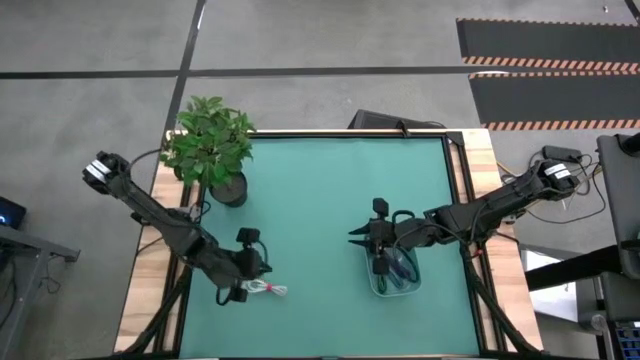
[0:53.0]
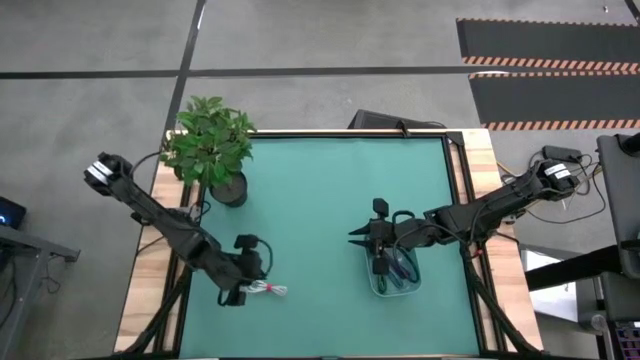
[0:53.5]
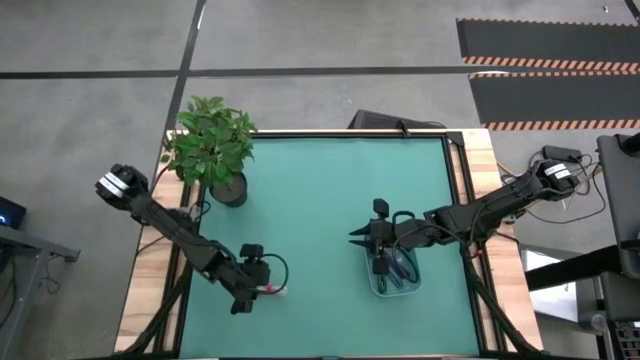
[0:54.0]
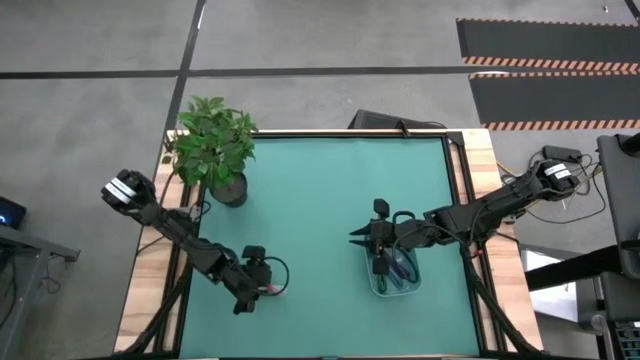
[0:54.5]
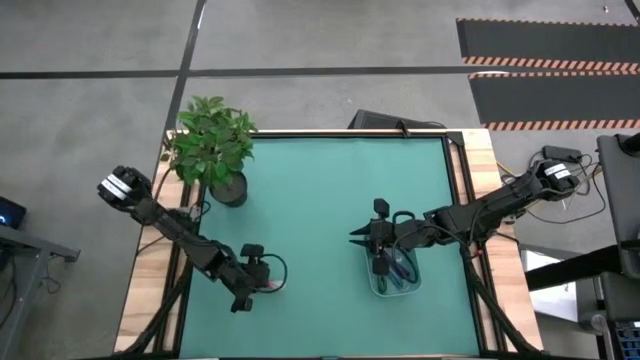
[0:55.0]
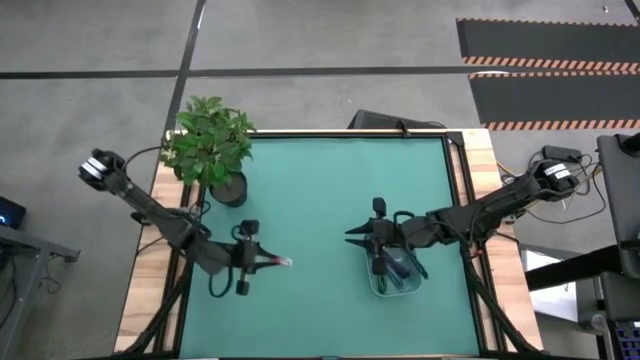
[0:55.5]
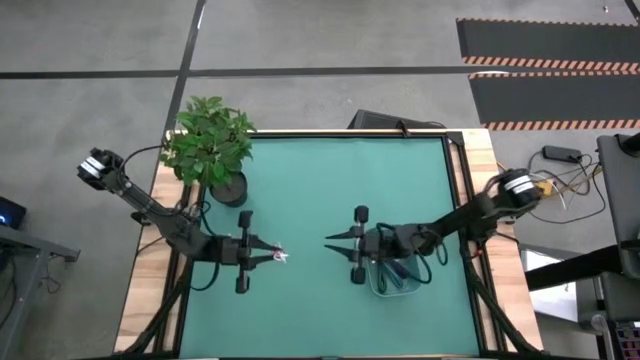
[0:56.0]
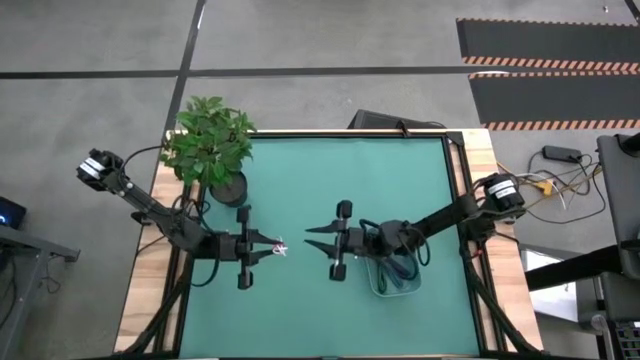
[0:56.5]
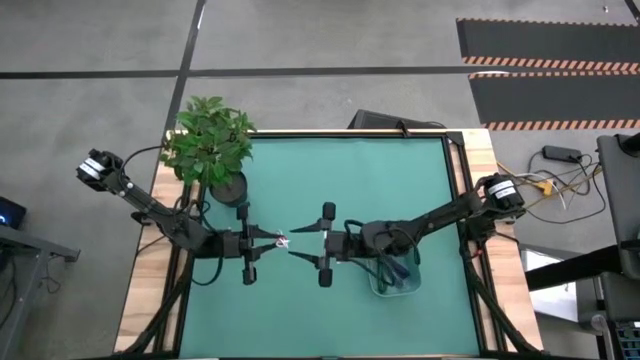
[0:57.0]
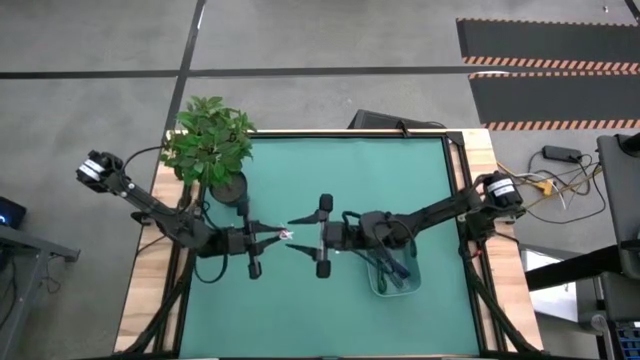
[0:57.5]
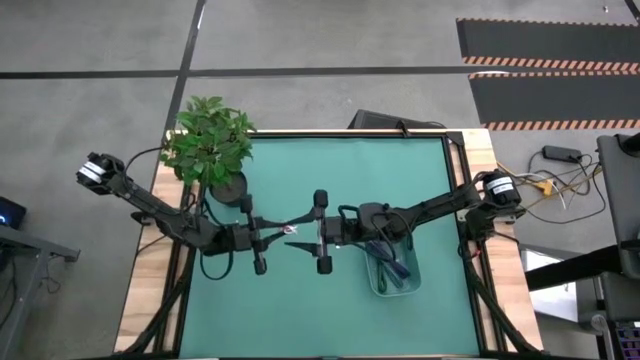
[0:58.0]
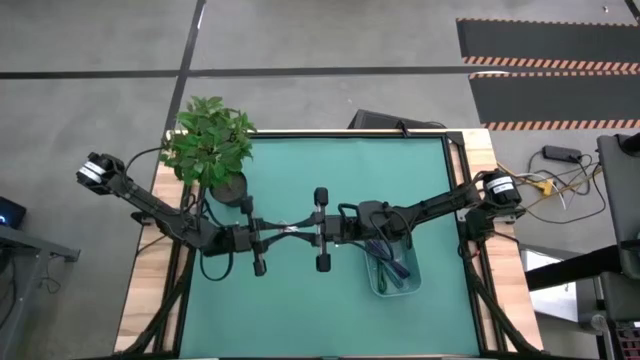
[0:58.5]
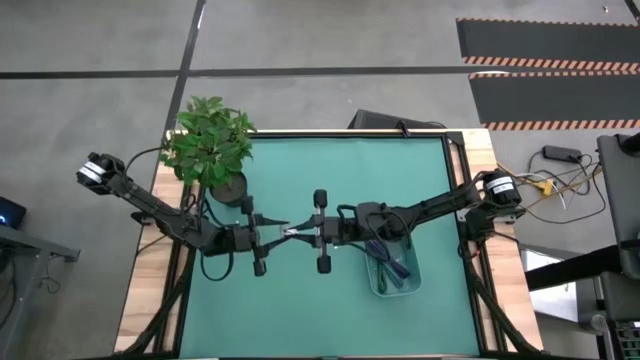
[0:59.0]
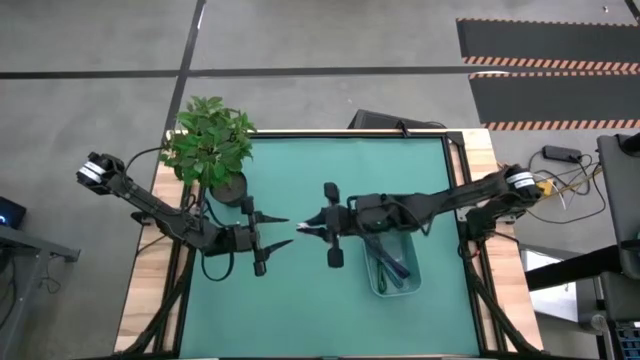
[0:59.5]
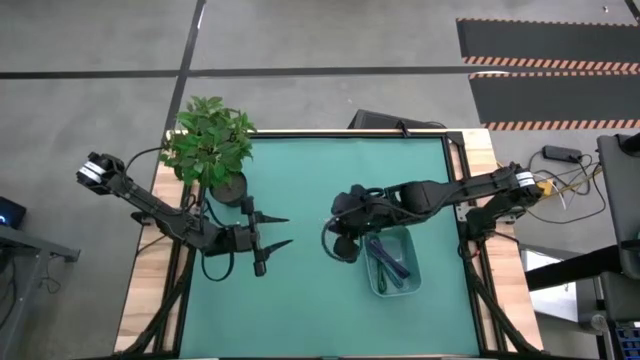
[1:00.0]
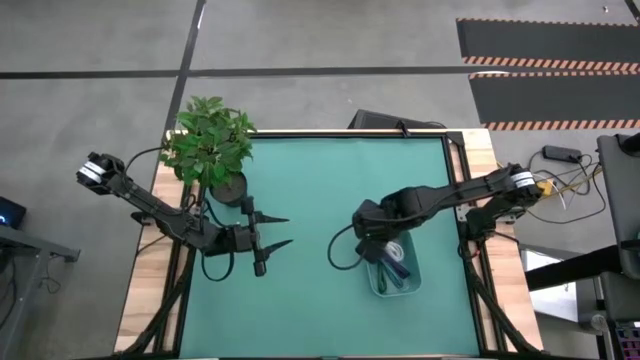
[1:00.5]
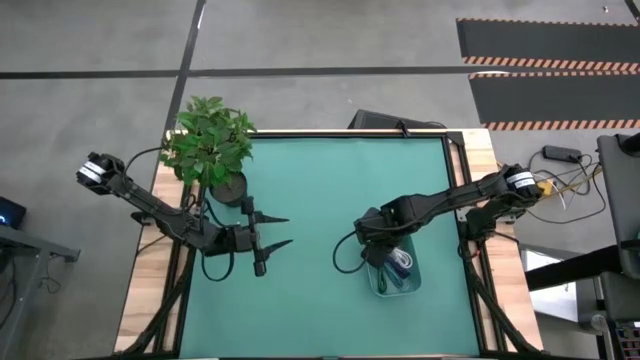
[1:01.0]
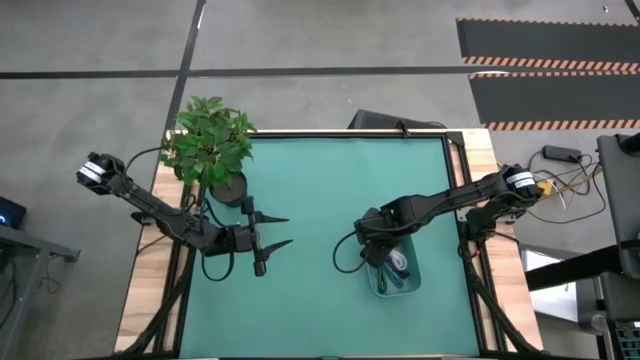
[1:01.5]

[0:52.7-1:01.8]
Task: Pick and place USB-C Cables
Put the white charger cable into the blue bin

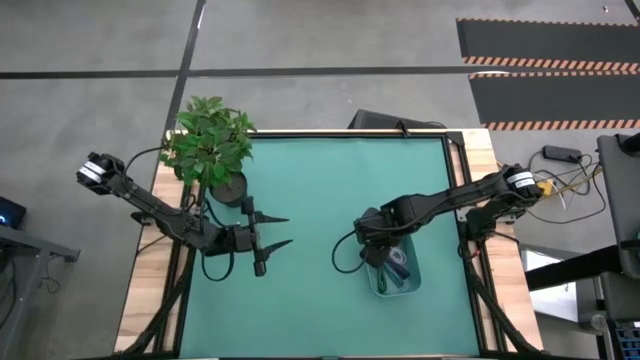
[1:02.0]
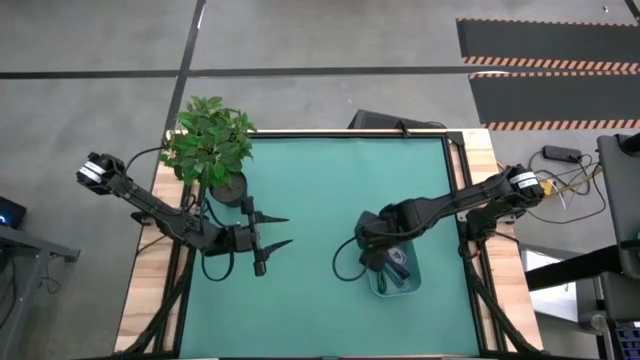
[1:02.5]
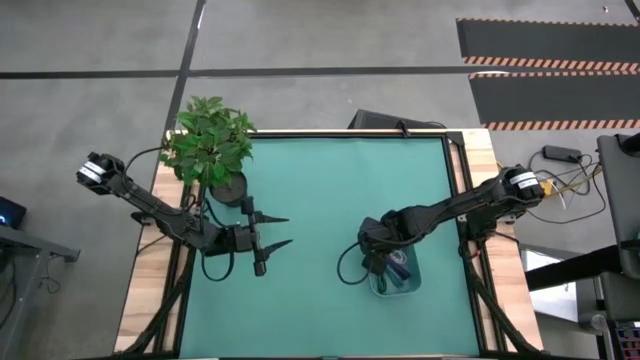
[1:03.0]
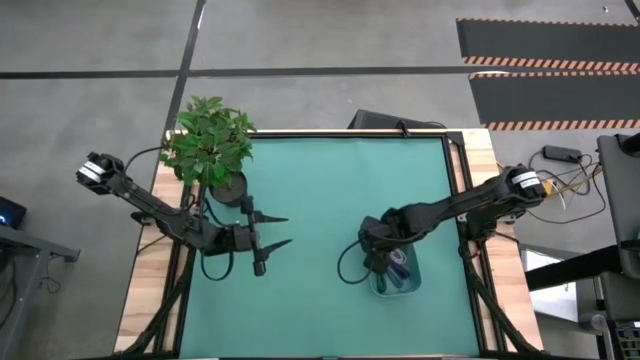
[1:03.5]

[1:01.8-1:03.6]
Adjust the violet charger cable into the blue bin

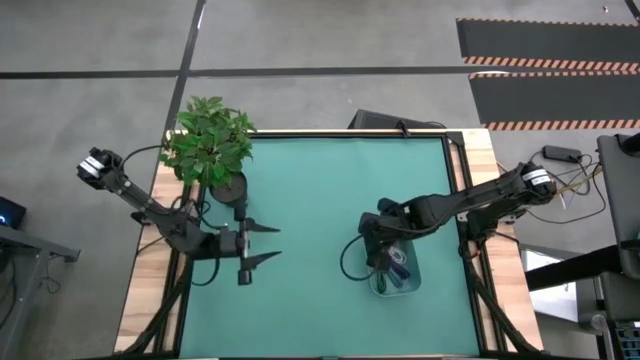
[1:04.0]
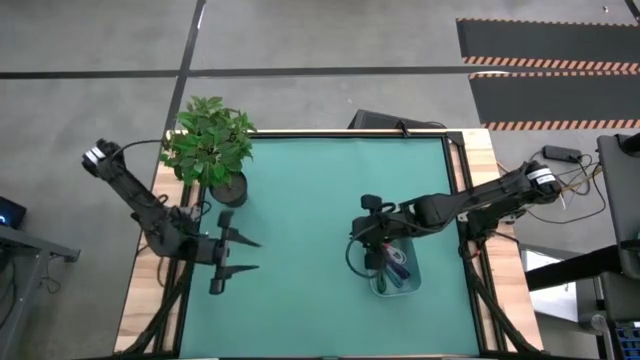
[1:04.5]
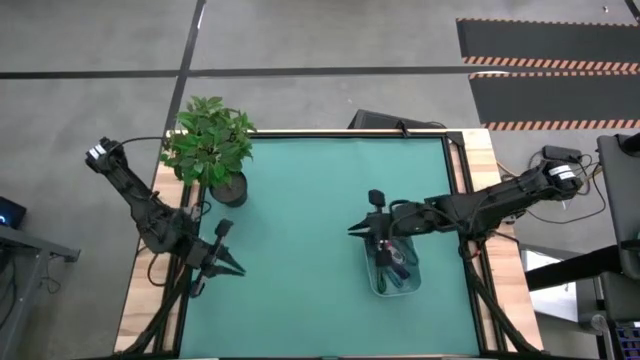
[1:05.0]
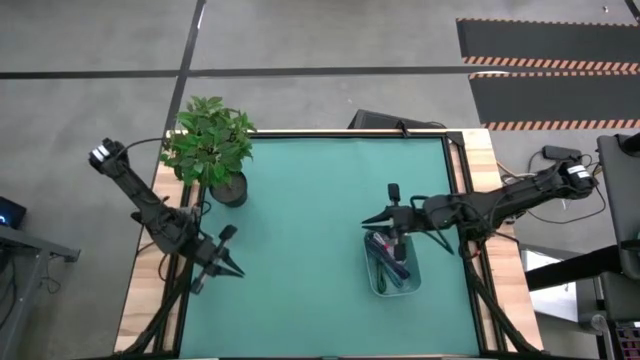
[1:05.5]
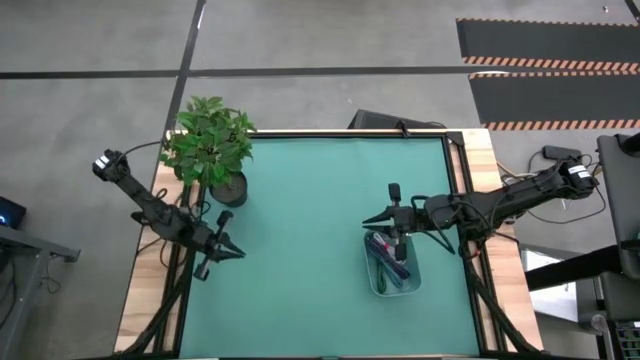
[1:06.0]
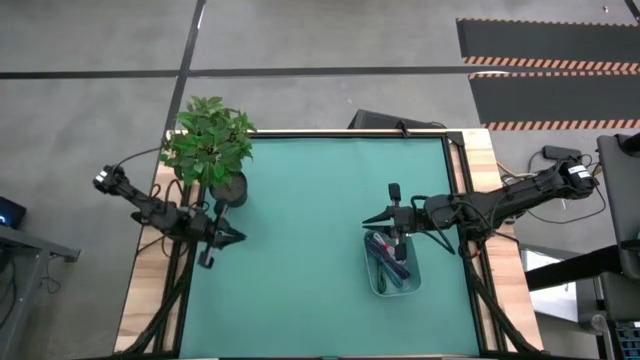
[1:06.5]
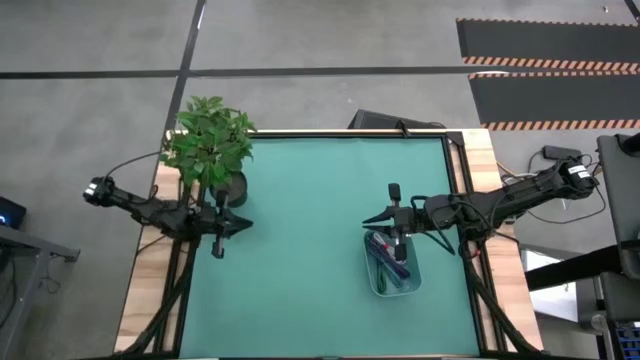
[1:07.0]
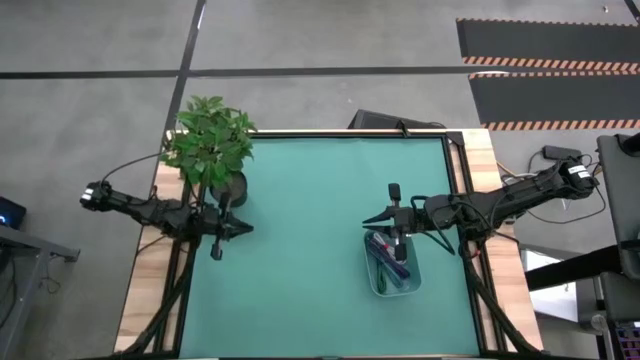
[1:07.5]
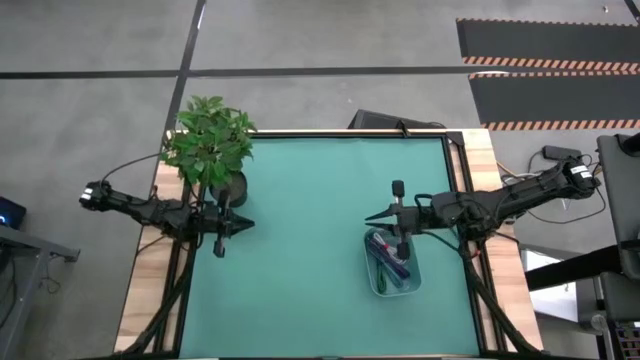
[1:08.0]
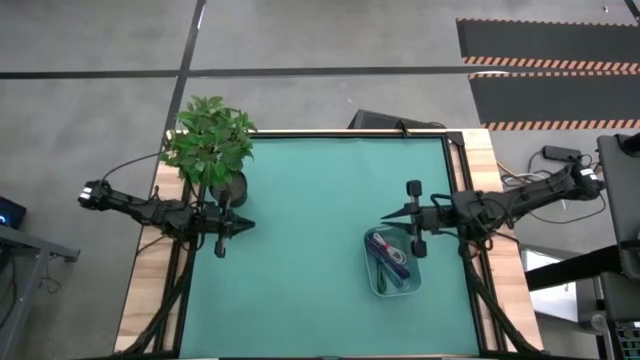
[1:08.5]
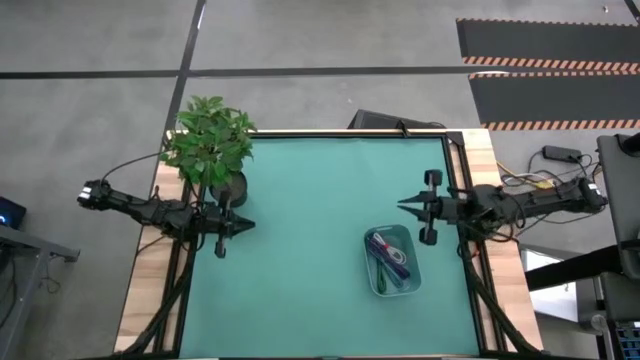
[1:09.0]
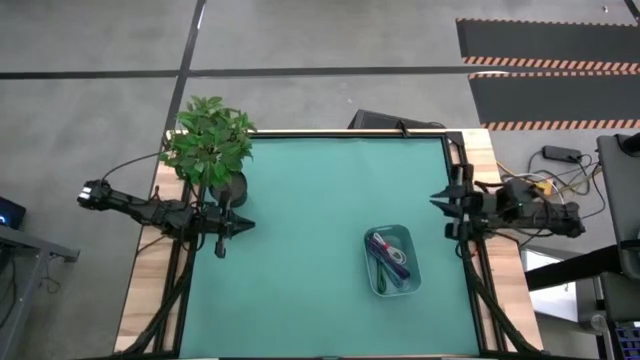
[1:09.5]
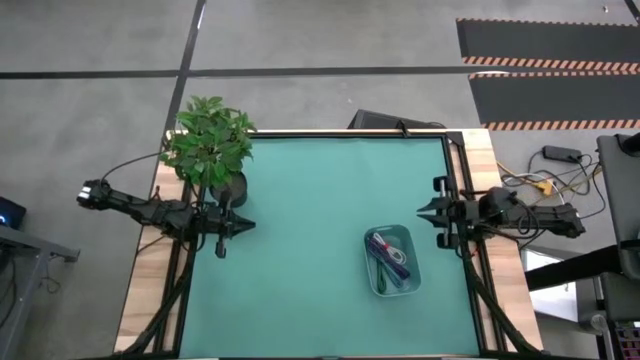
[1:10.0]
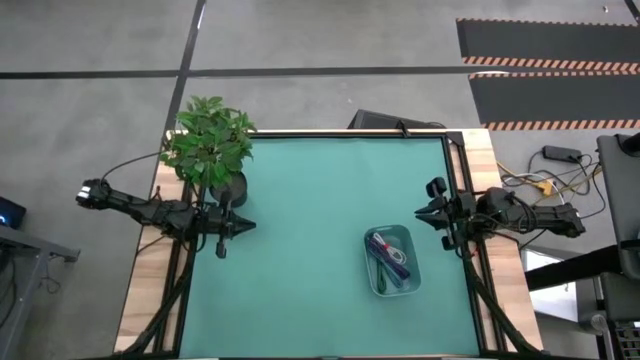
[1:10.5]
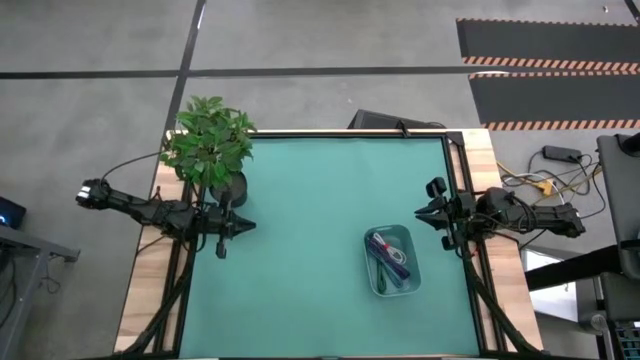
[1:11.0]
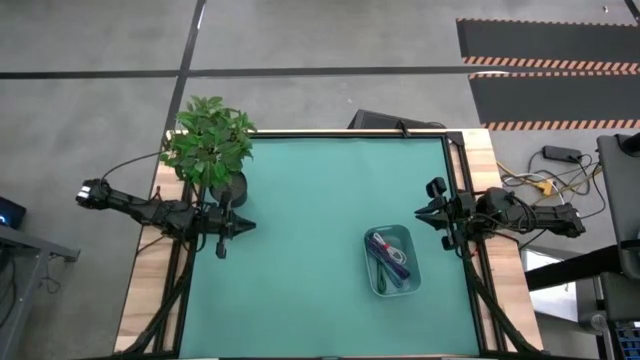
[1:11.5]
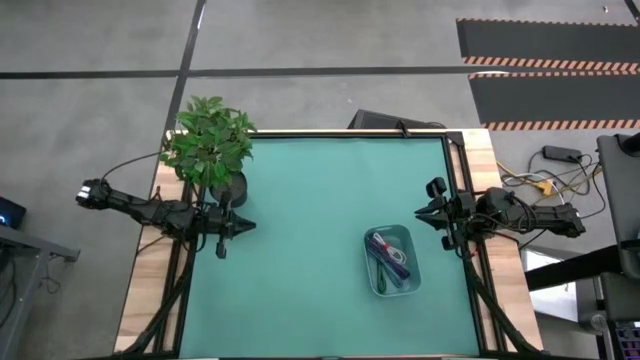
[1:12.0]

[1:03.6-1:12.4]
Return to Home Position

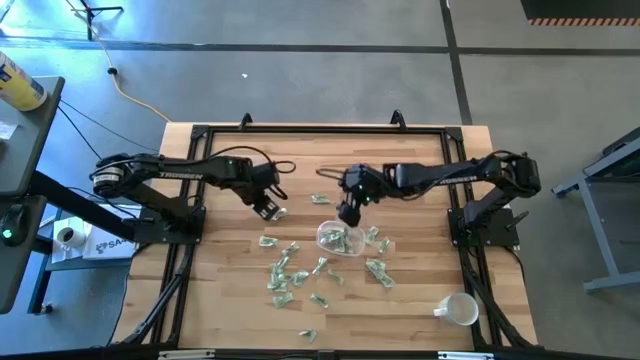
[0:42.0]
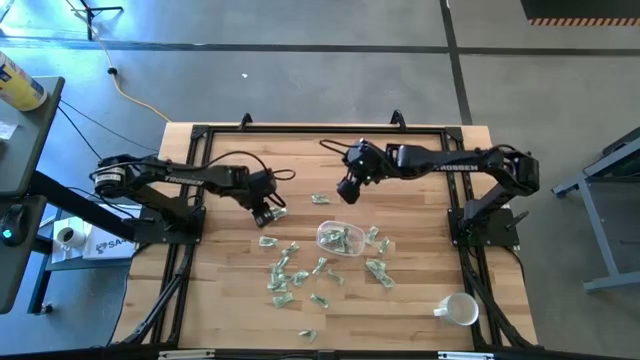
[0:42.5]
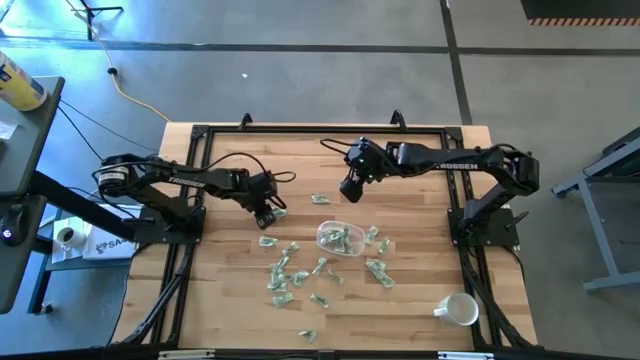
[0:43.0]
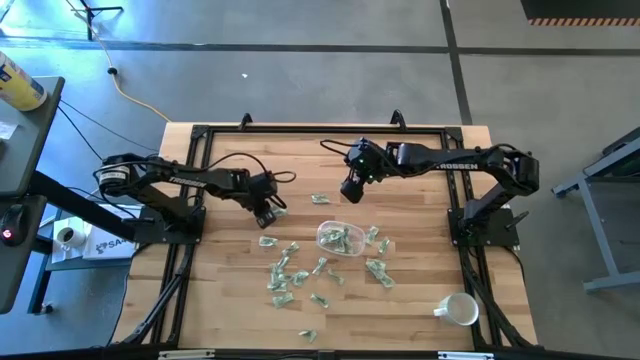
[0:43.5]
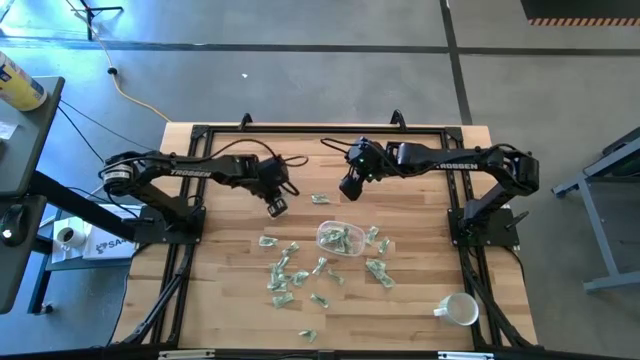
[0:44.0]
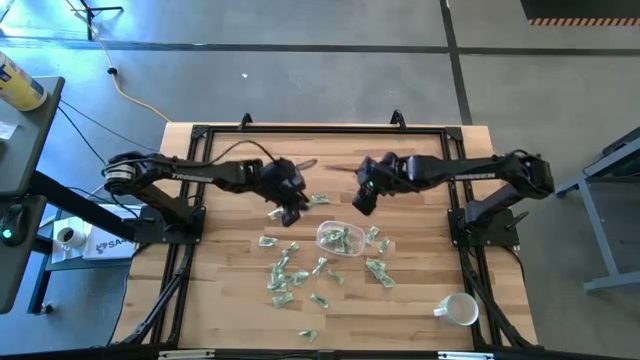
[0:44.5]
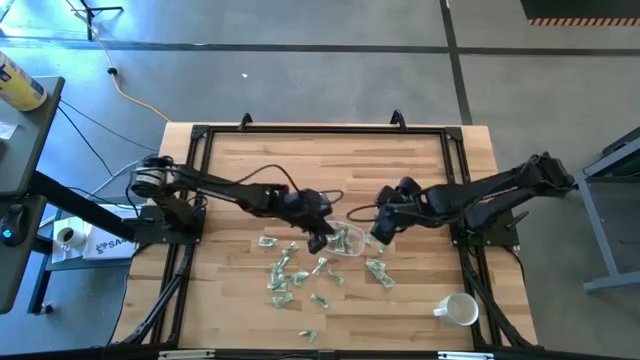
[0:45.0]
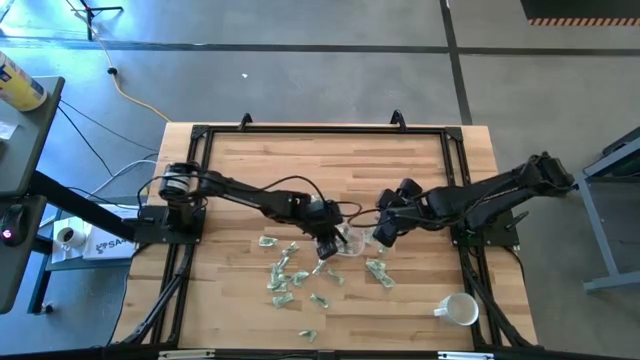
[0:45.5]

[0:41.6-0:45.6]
Task: Pick and place Stevia / Truvia into bins
Put the green stevia packet into the transparent container
